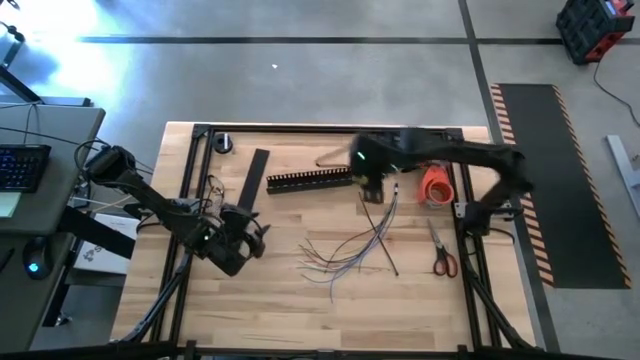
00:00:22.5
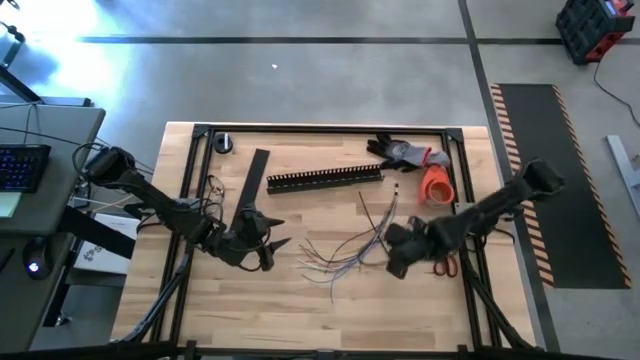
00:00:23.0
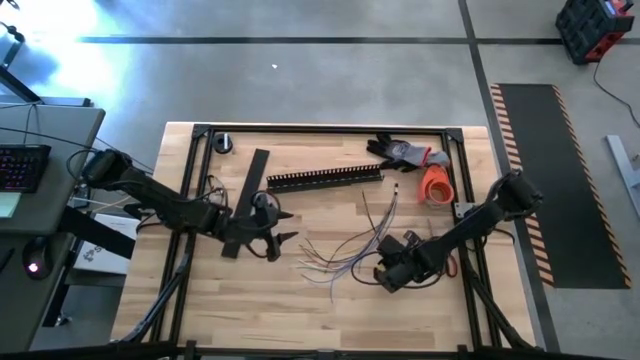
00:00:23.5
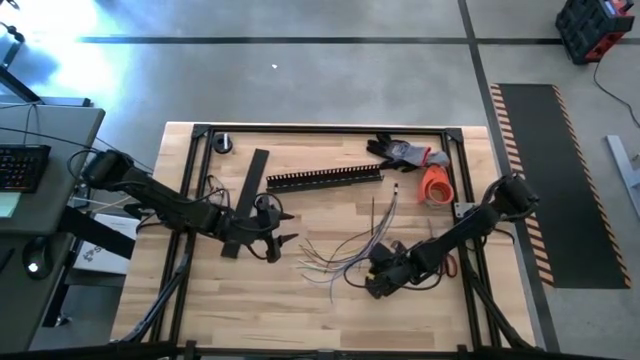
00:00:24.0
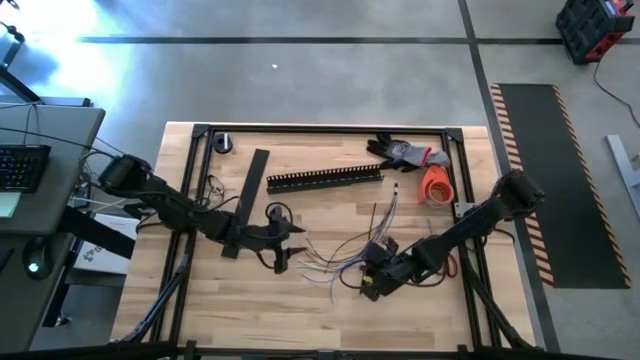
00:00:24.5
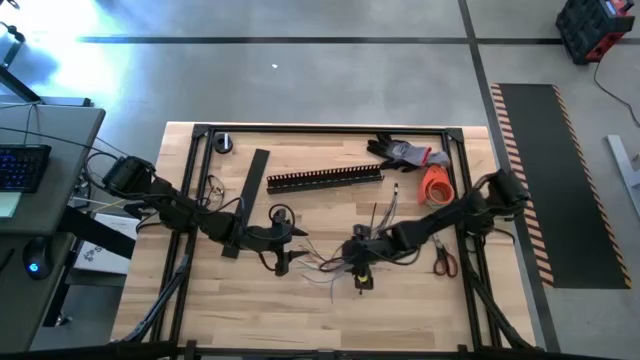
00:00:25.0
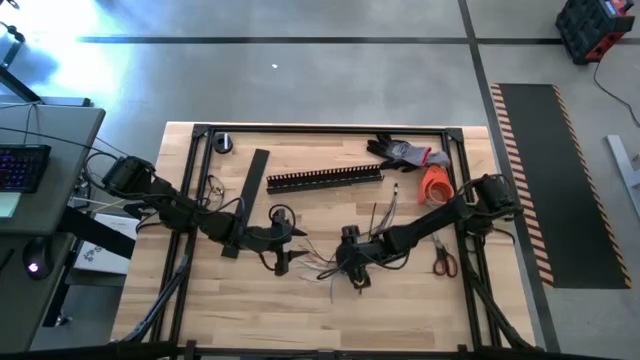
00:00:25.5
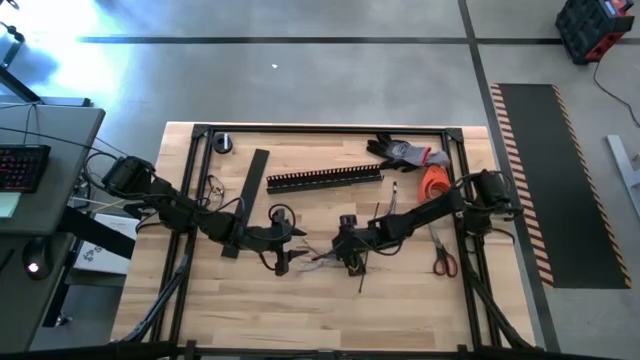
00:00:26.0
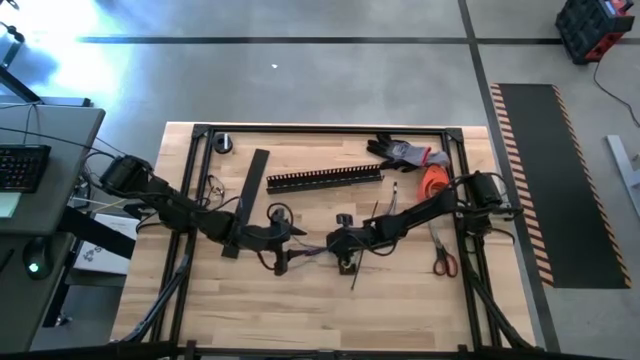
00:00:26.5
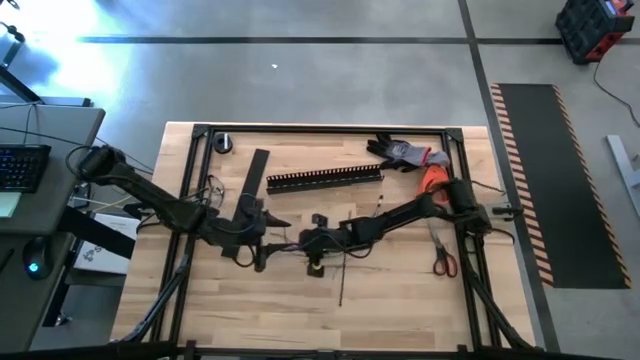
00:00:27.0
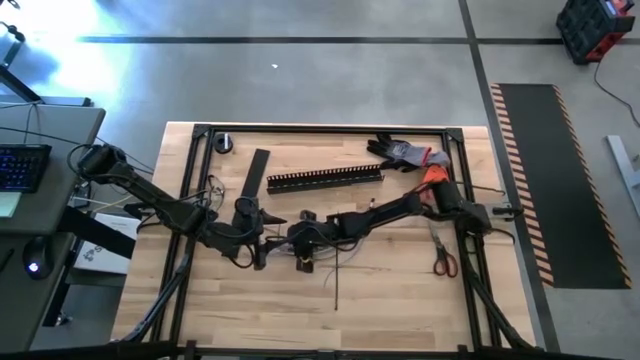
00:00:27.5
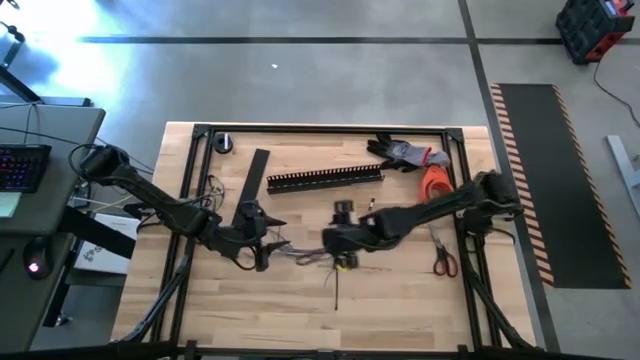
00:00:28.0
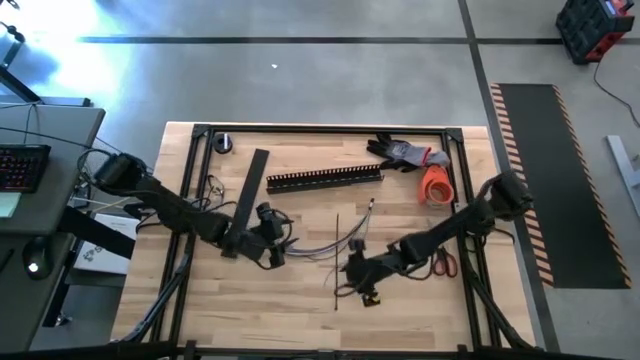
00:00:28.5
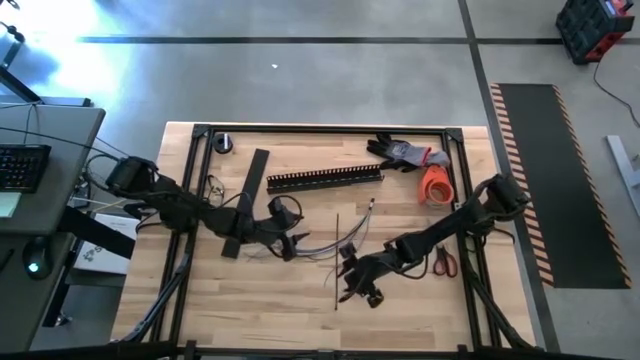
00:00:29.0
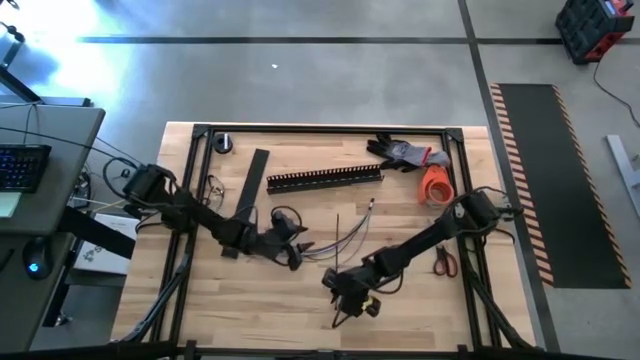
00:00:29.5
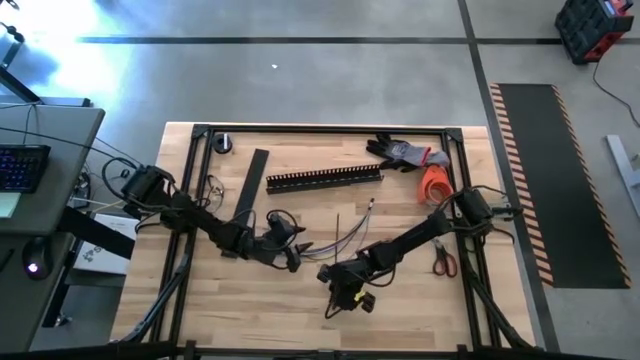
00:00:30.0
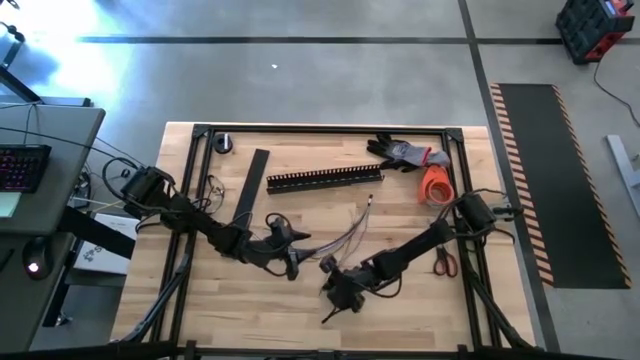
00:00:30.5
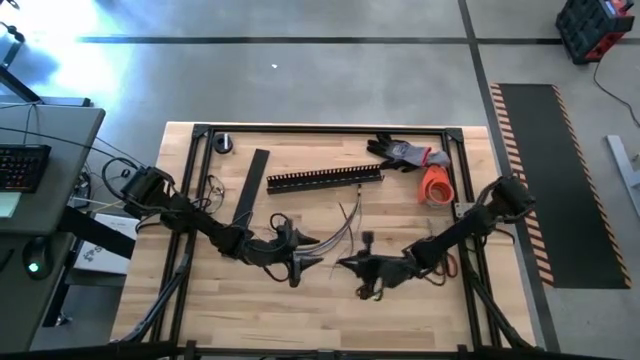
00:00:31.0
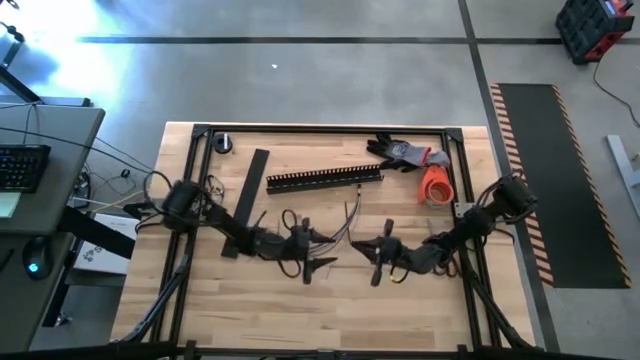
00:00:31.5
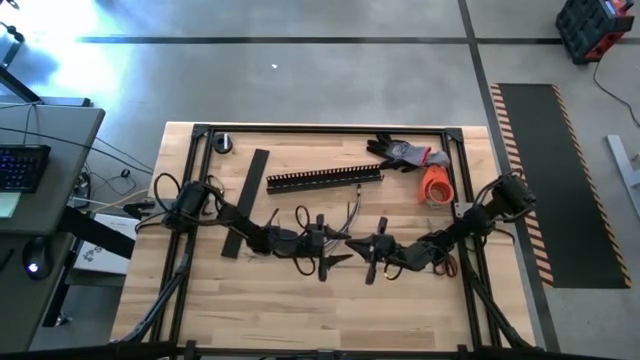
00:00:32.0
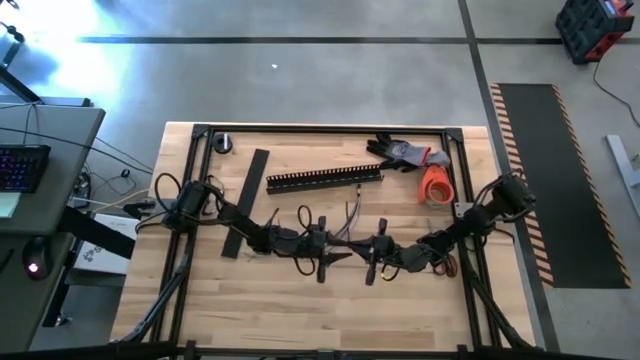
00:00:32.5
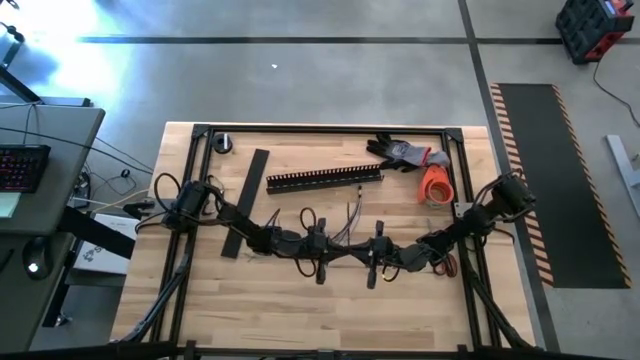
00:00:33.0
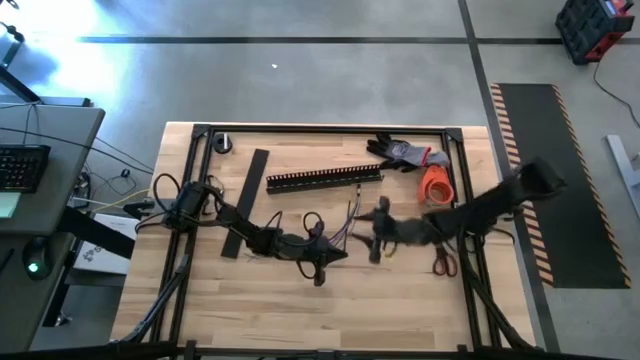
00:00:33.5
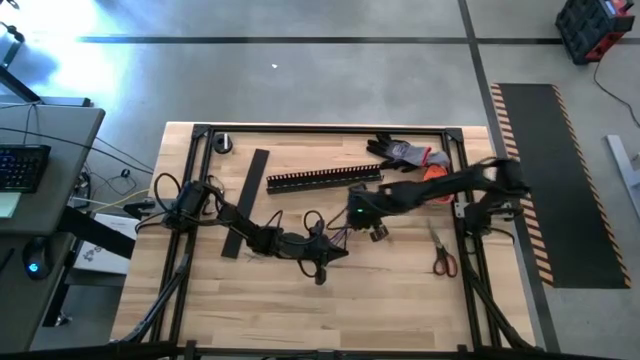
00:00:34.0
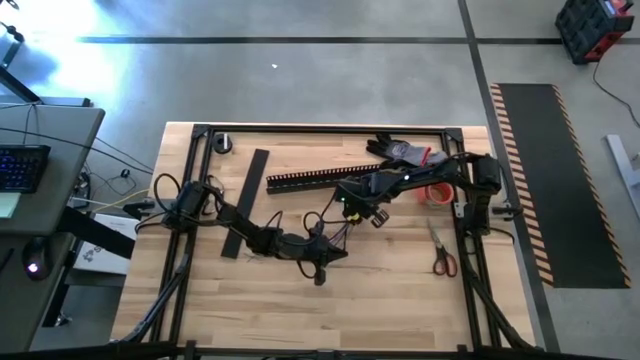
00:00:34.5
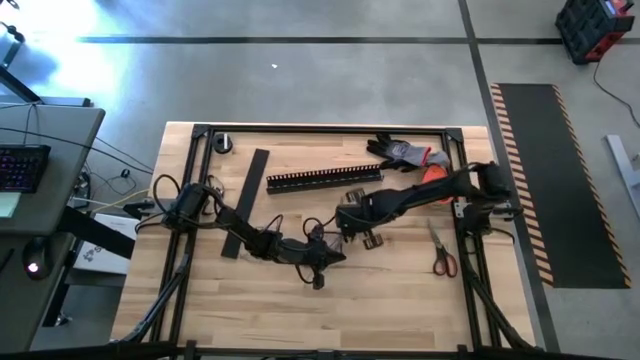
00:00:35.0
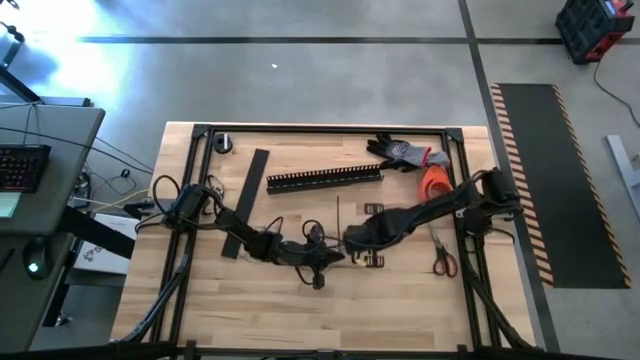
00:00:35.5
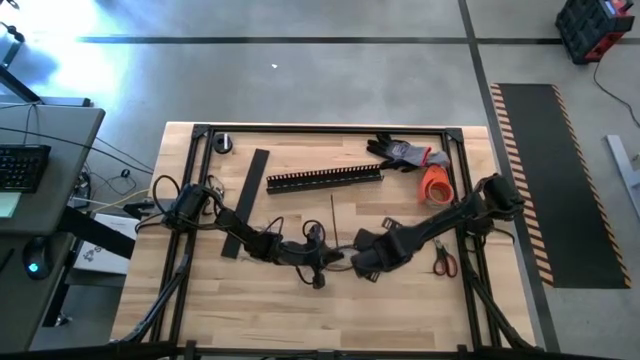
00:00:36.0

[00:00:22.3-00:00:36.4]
Task: Ziptie cables
Wrap the cables together using a zip tie
